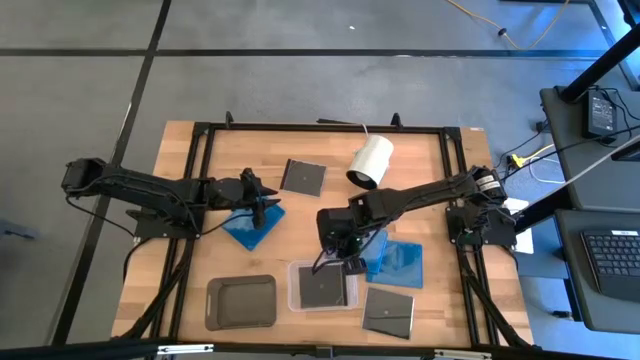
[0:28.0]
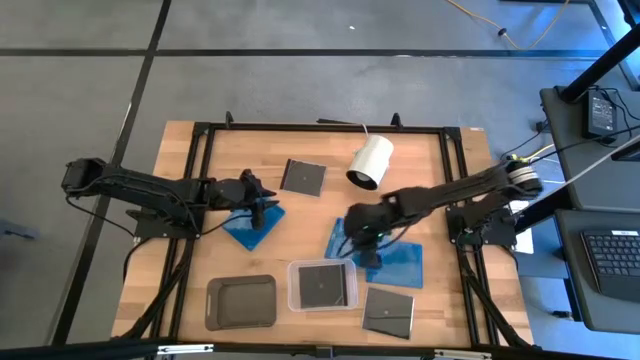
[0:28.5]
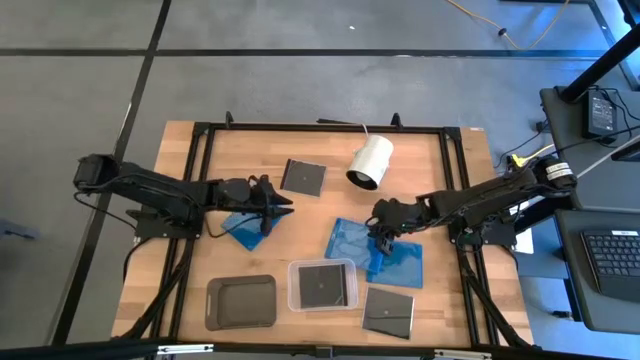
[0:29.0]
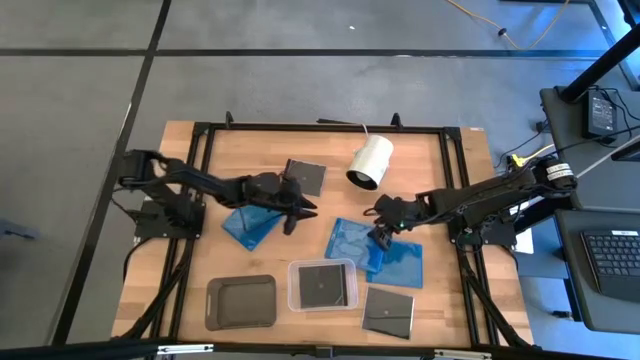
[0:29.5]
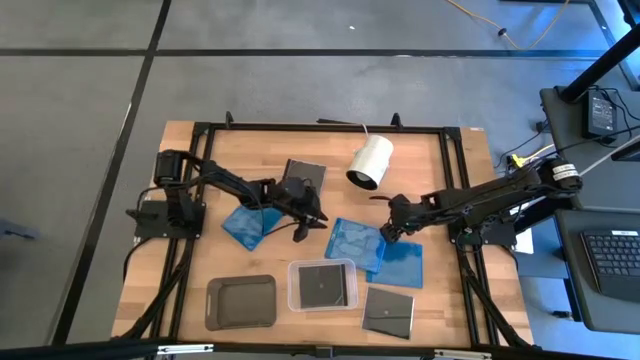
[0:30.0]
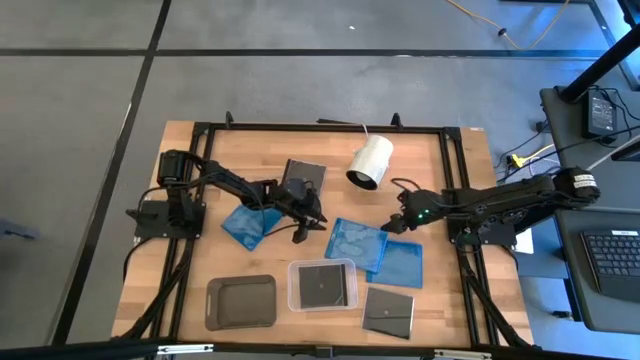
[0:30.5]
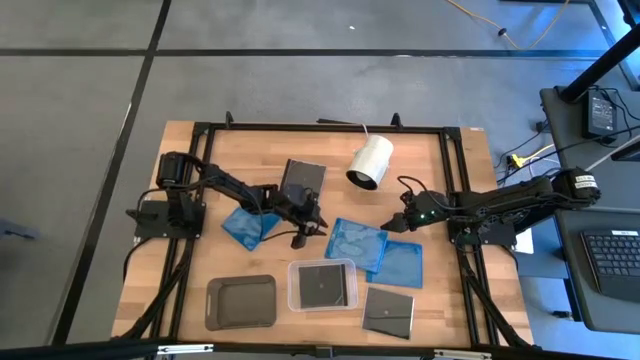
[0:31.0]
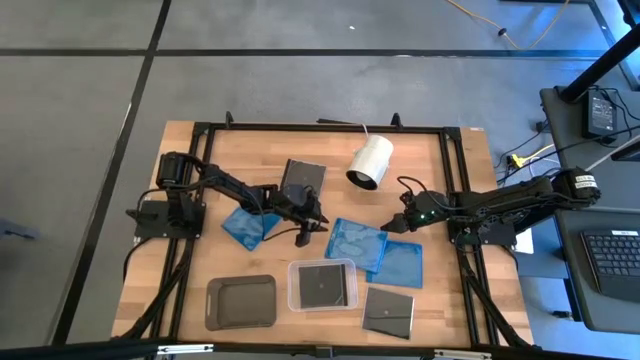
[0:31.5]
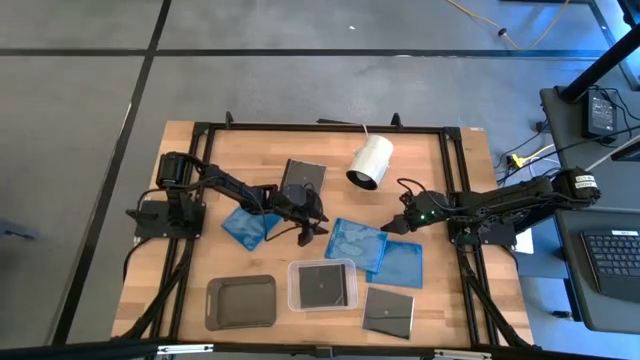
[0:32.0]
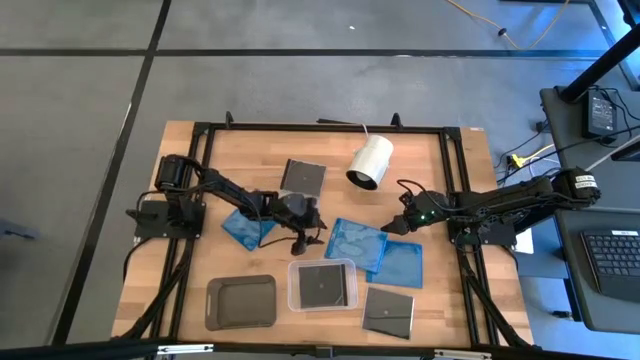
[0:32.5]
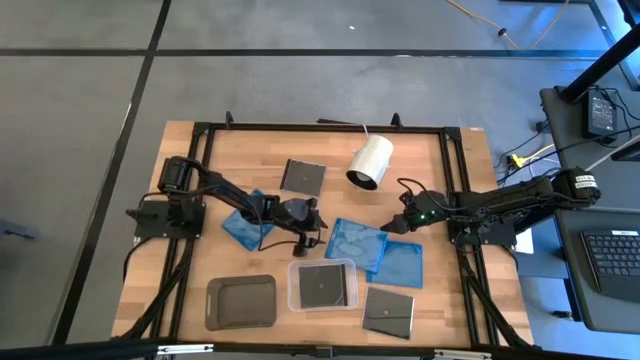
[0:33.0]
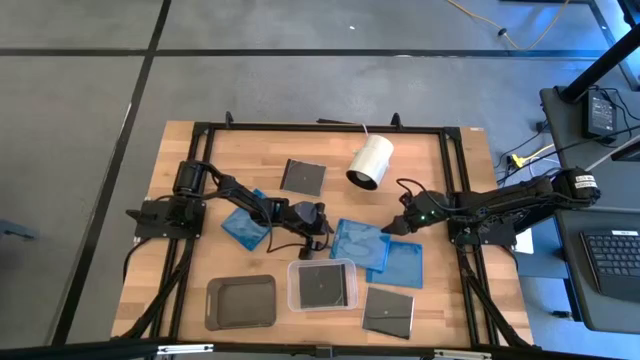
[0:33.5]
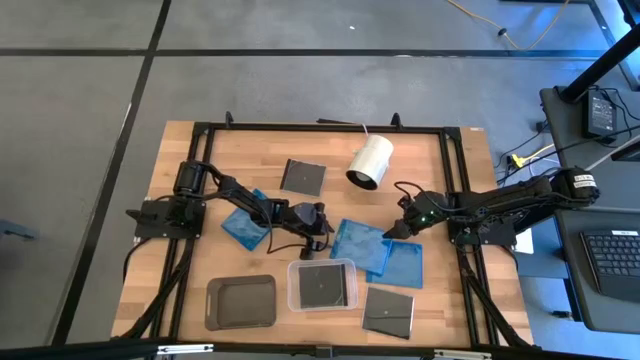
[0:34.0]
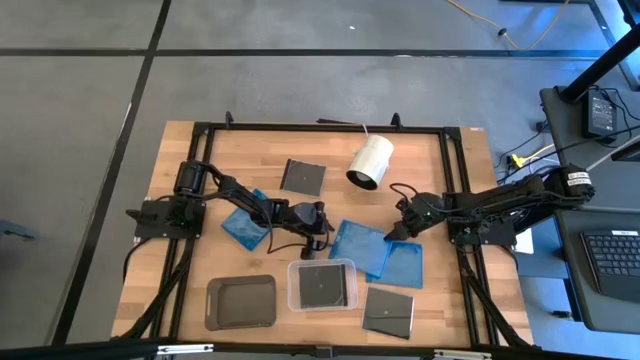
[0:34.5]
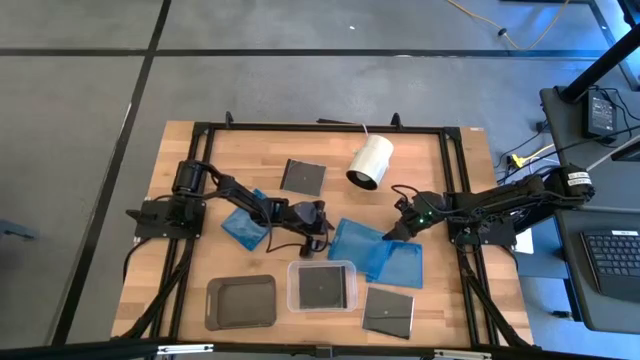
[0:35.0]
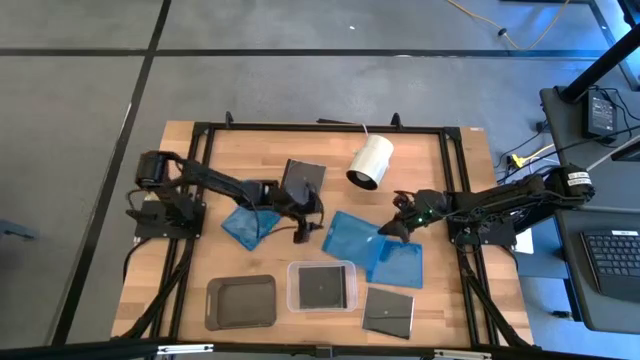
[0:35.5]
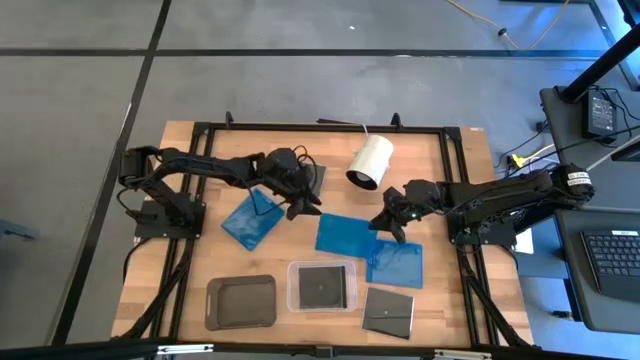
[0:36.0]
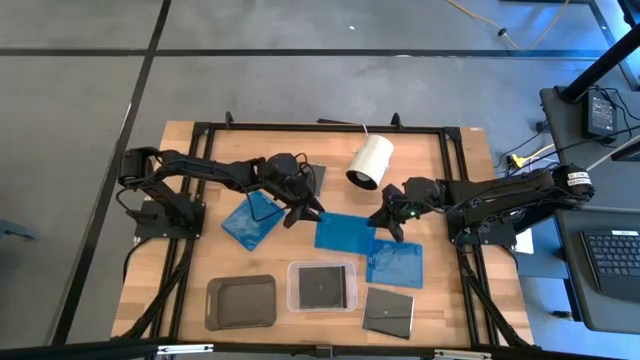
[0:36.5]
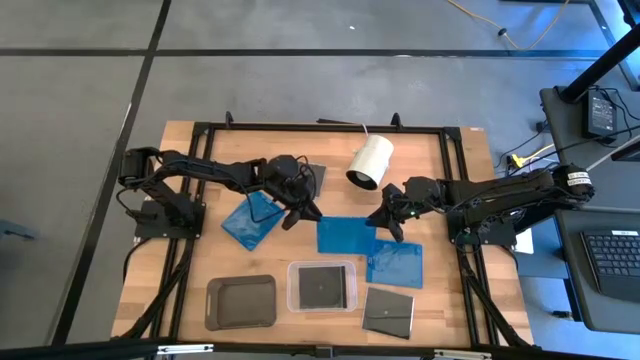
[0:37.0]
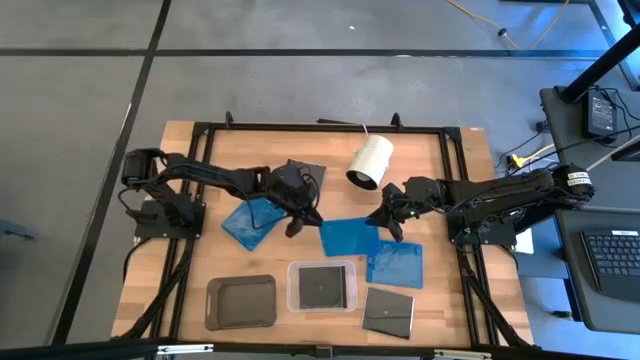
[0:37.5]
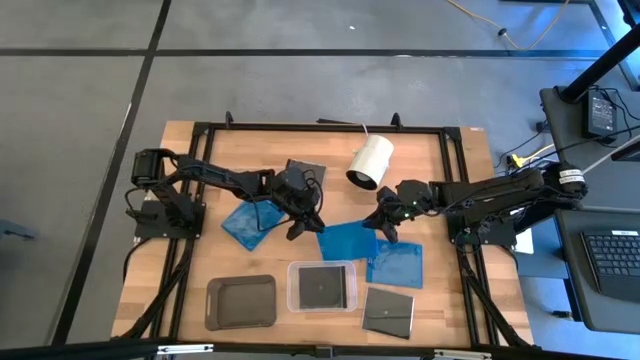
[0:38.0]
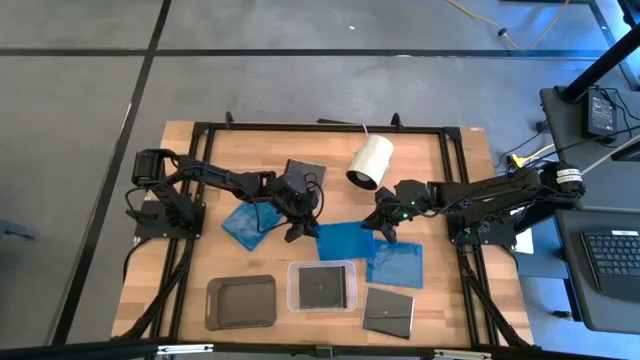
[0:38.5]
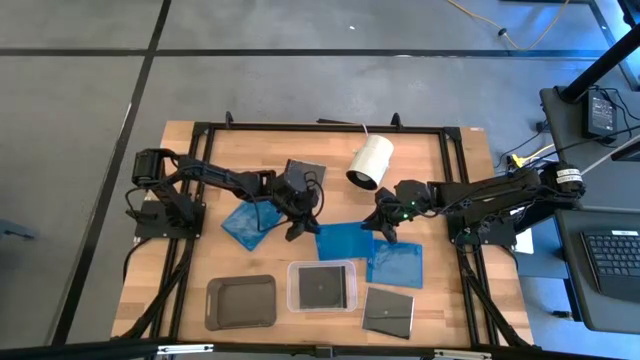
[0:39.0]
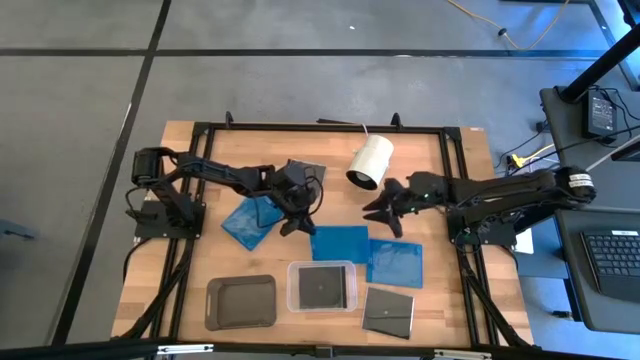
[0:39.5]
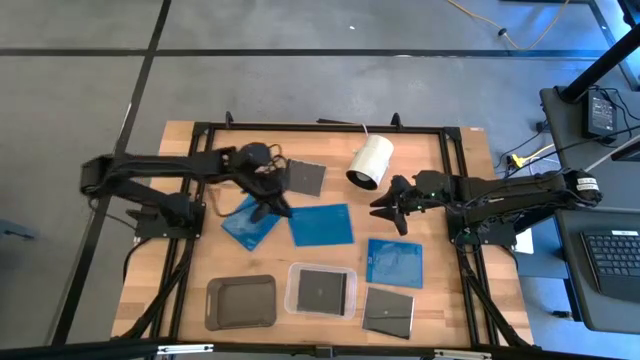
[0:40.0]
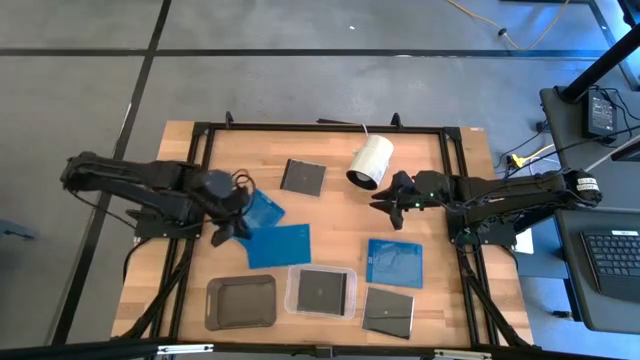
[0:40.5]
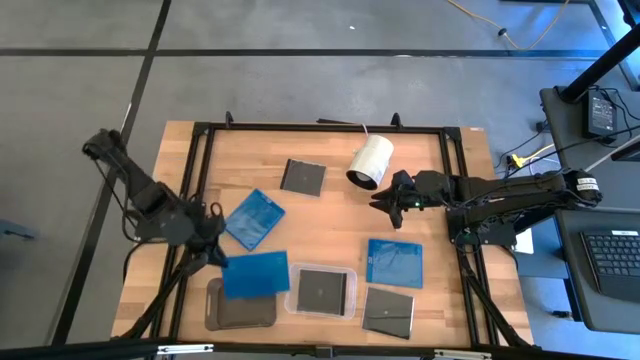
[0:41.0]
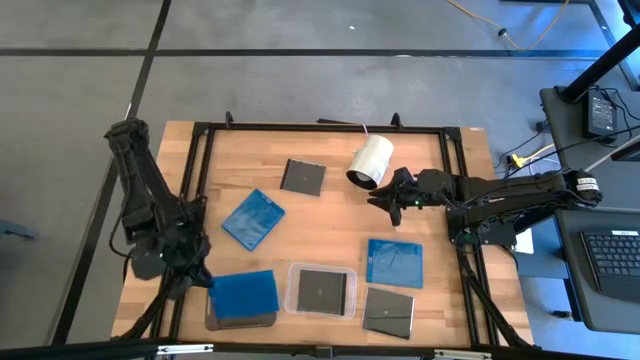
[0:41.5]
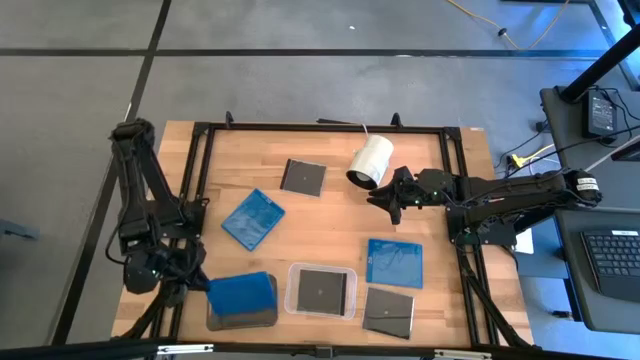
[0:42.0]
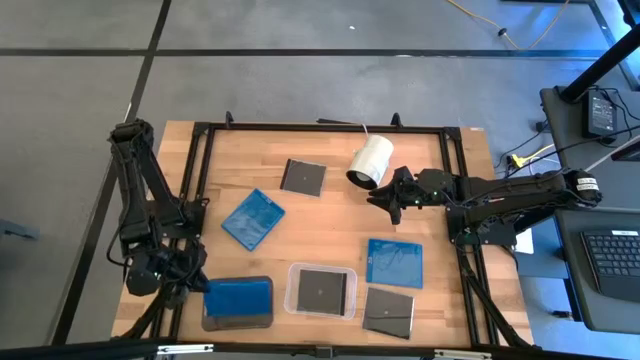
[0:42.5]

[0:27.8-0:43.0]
Task: Pick & place jewel cases by type
Put the middle blue CD case into the black bin

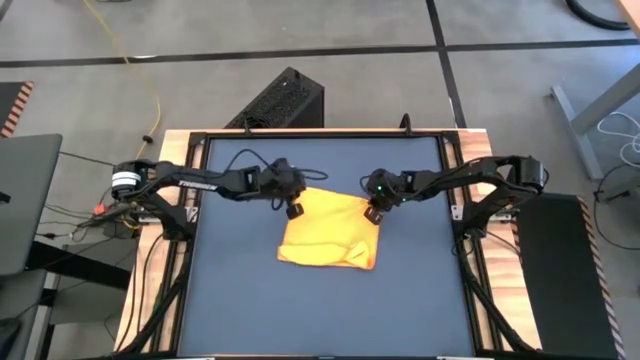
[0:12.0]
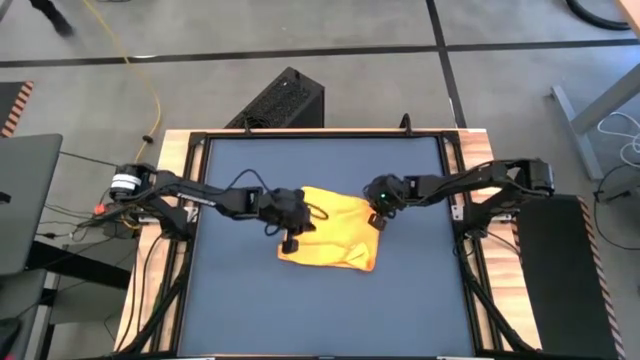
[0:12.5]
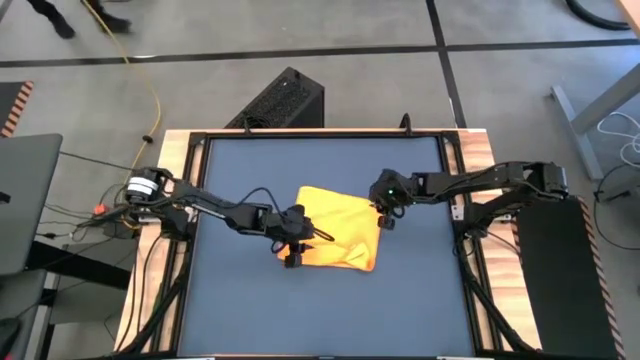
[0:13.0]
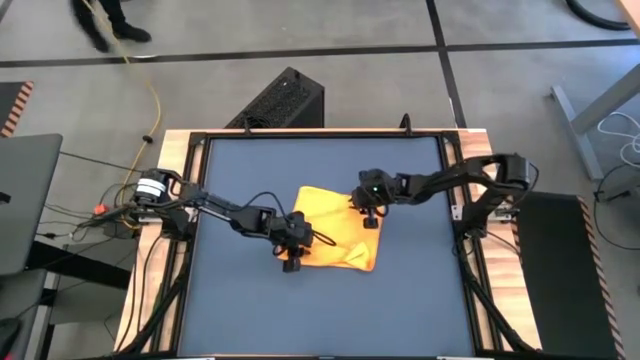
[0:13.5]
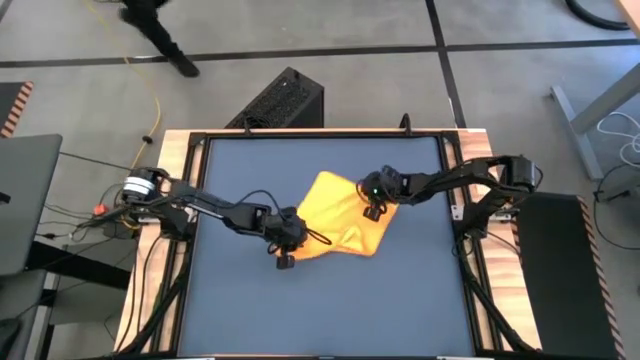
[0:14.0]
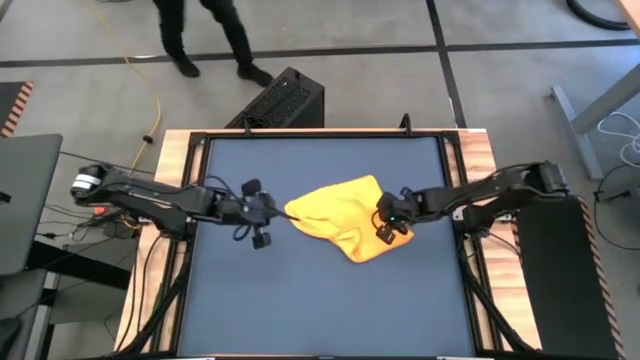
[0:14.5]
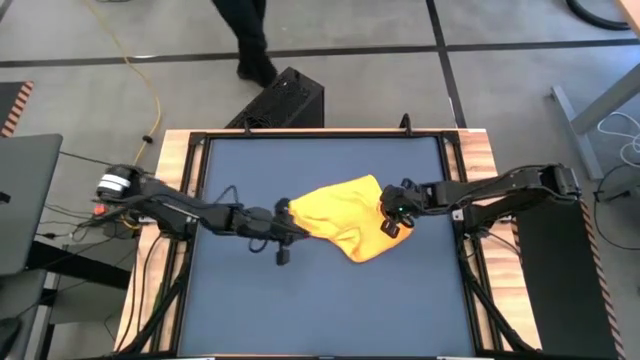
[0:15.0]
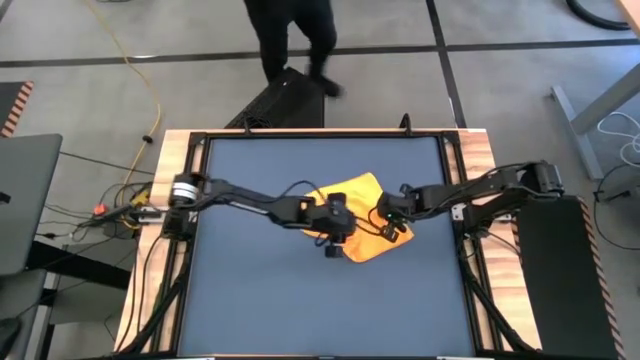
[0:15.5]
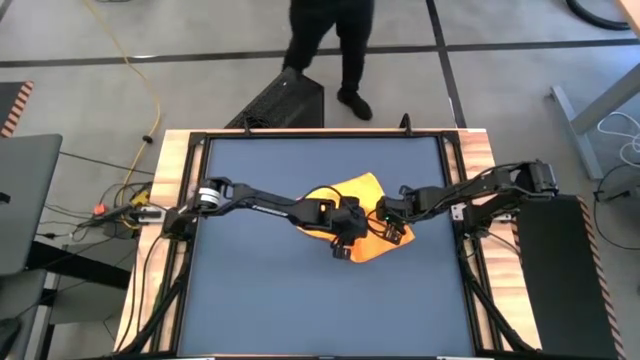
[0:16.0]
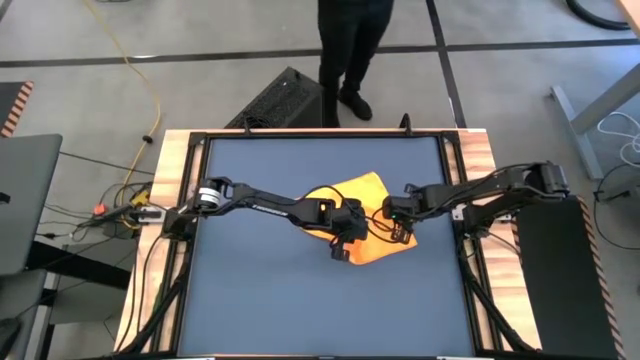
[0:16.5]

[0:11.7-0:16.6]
Task: Roll towel into tight, uniform cylinder
Roll the orange microfiber towel
